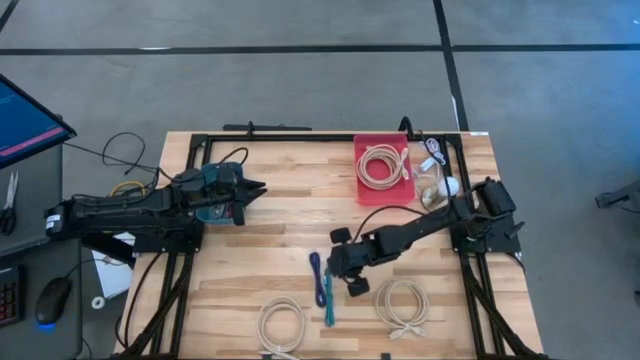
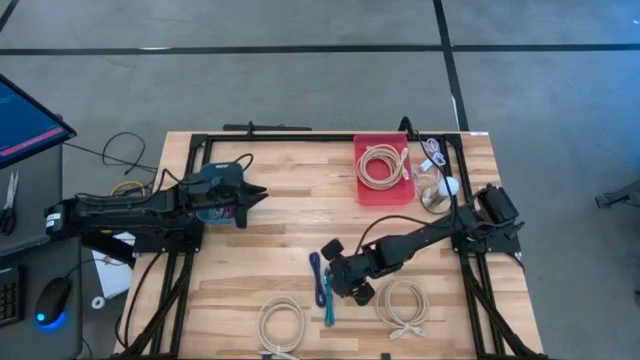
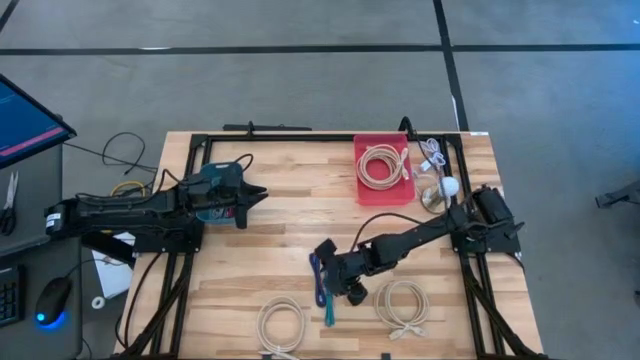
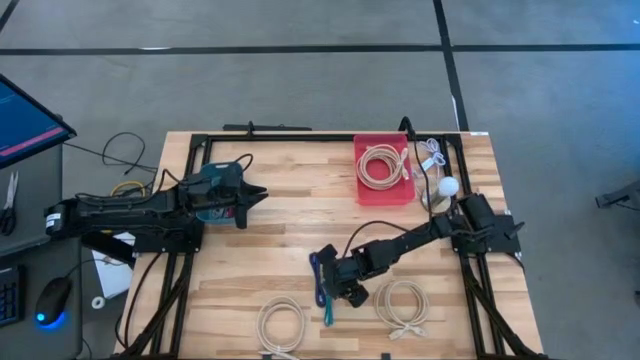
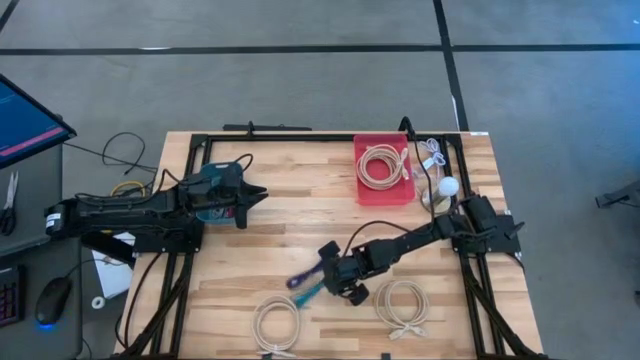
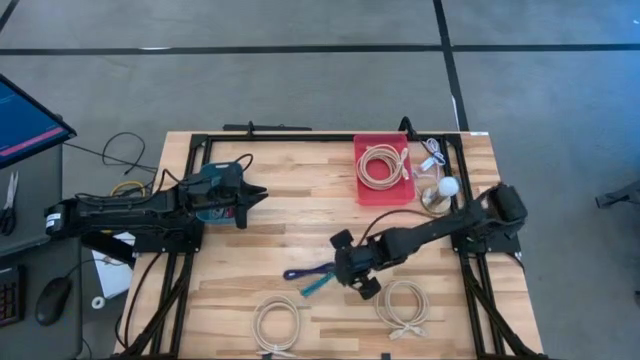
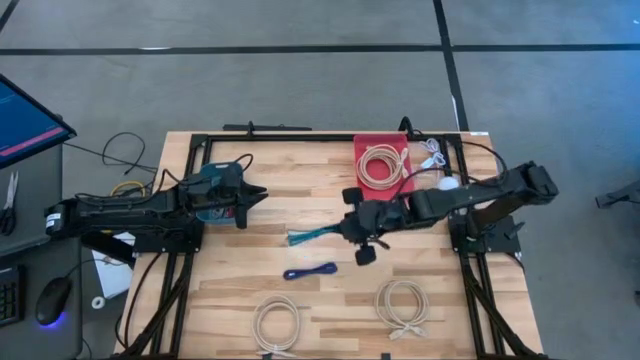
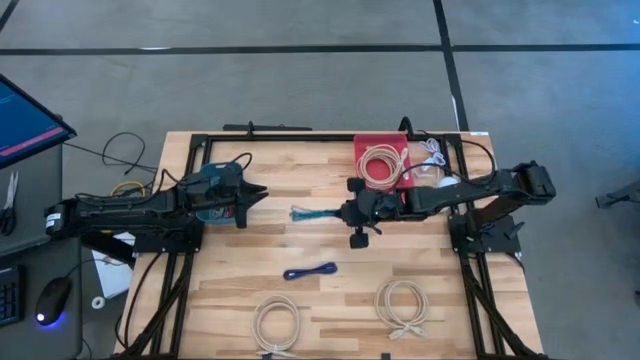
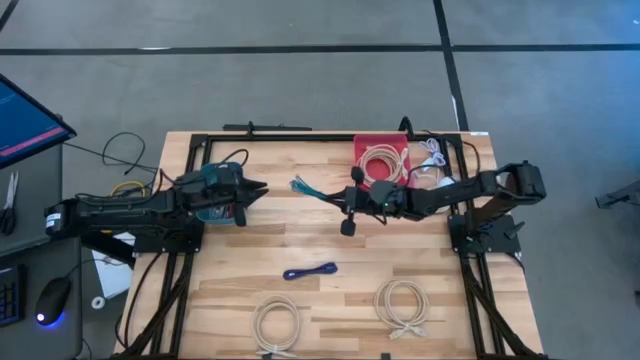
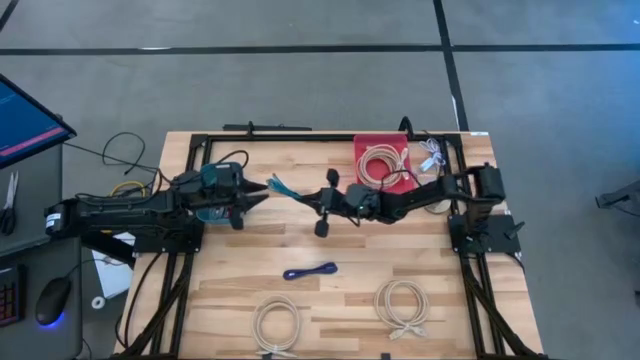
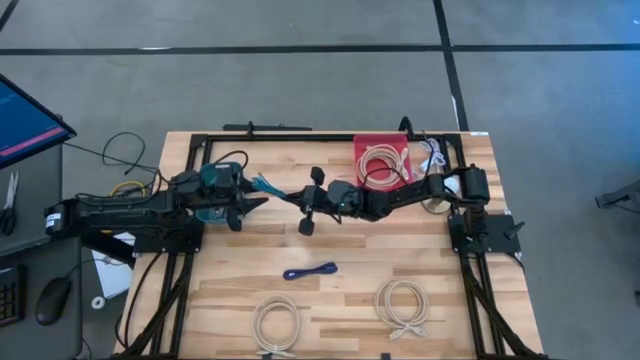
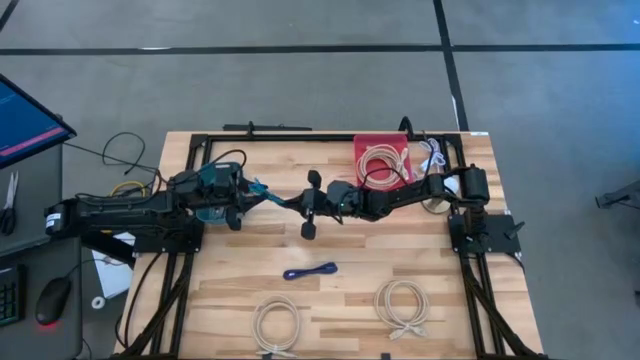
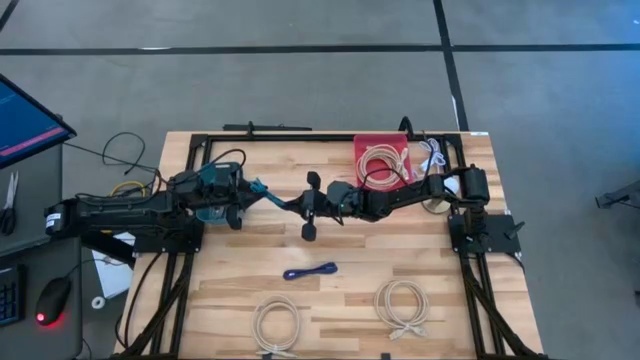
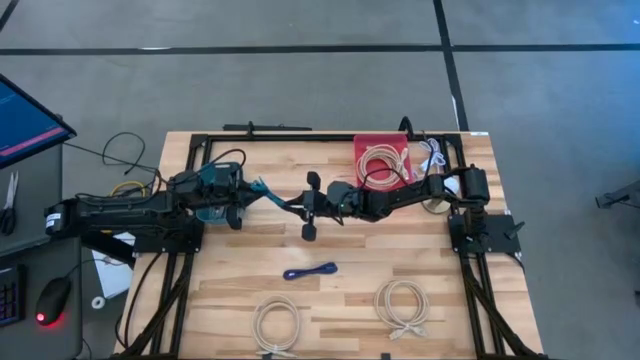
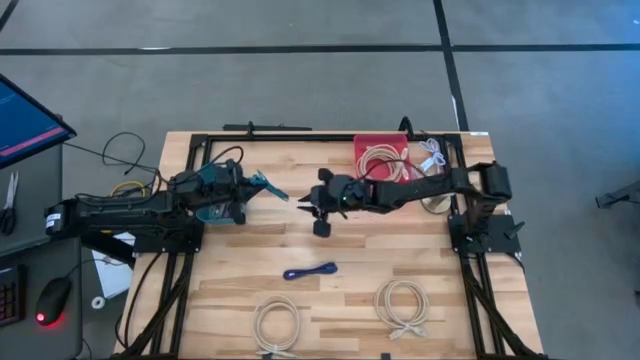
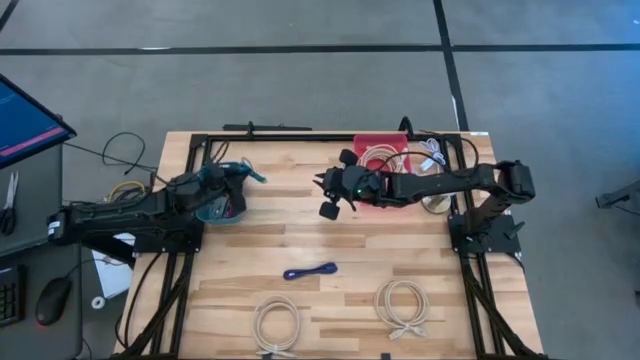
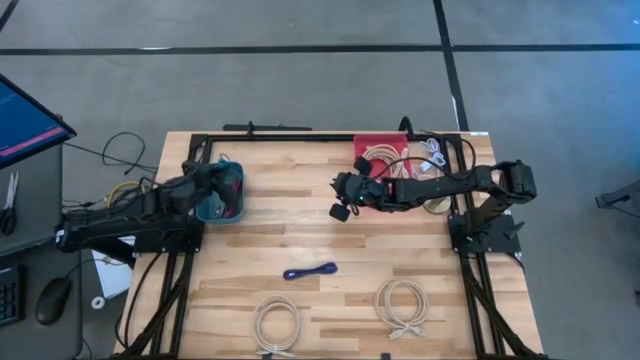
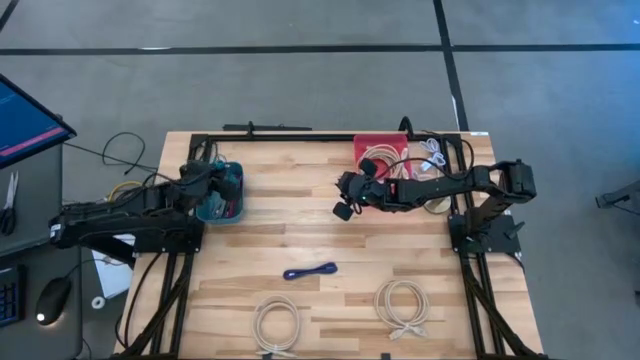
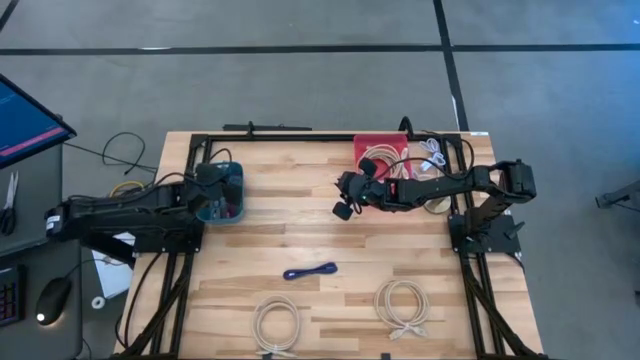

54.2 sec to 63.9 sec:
Task: Pick & Place USB Port
Put the blue charger cable in the blue bin

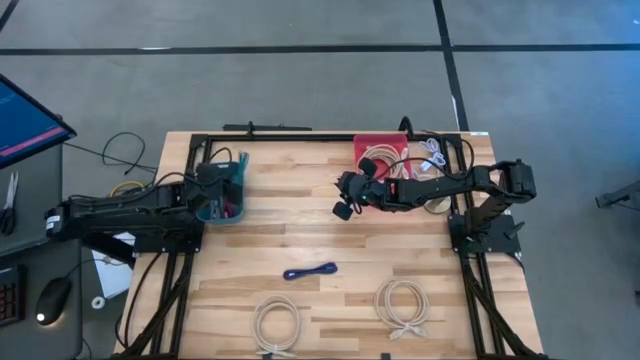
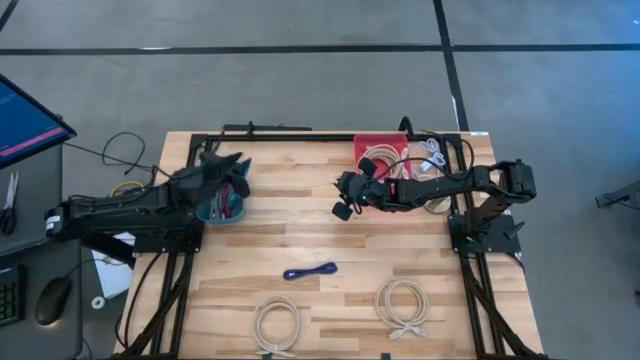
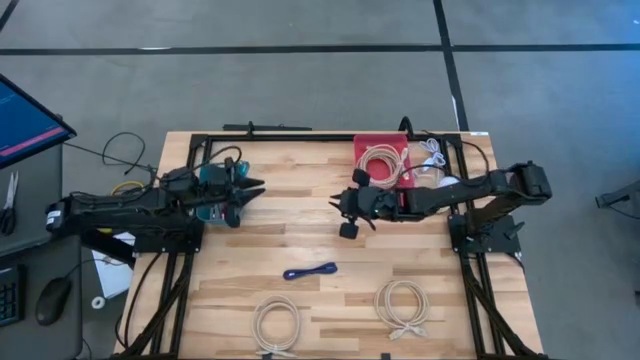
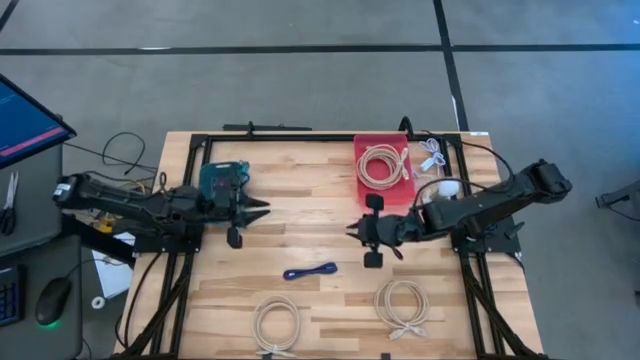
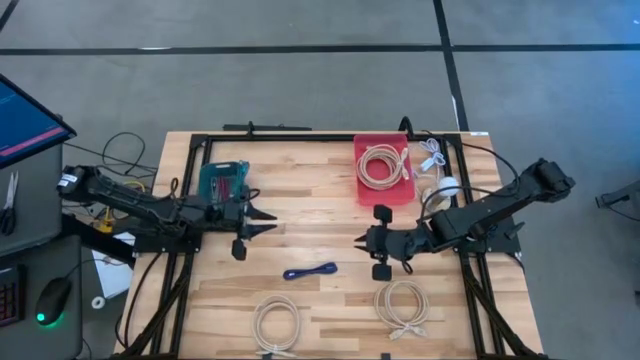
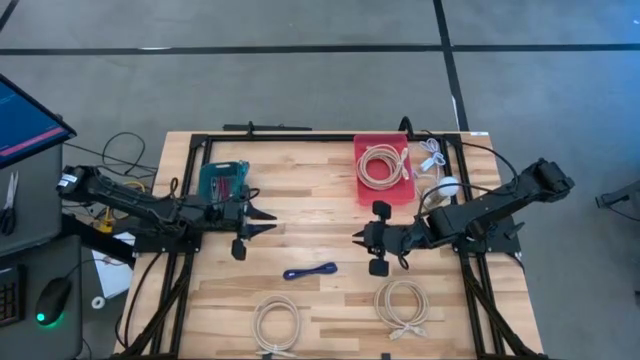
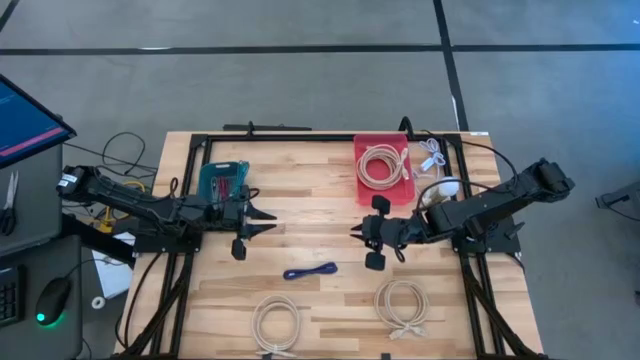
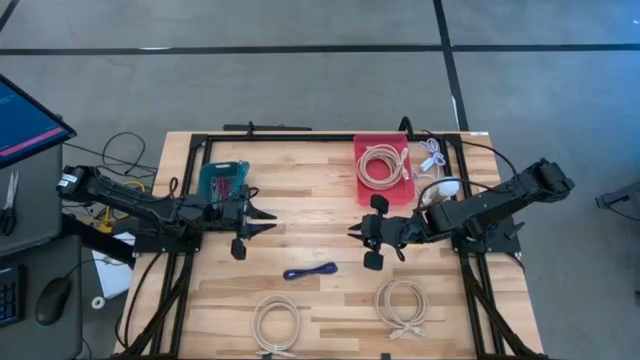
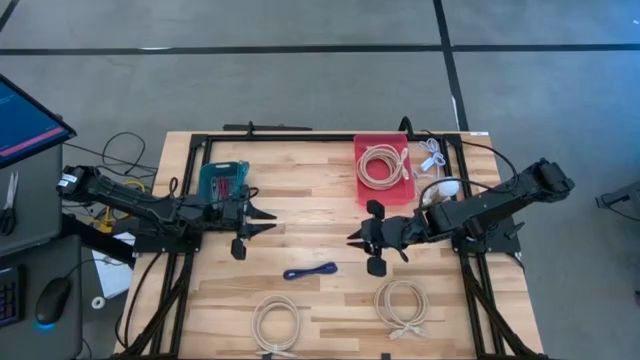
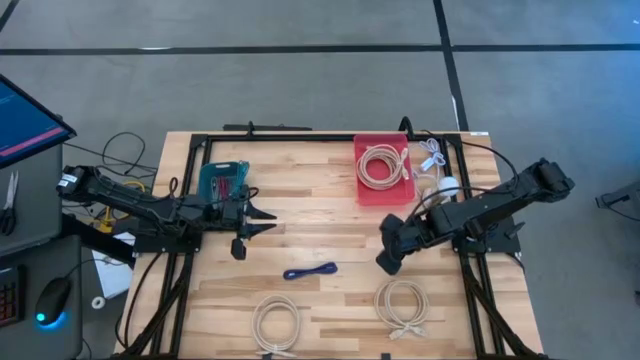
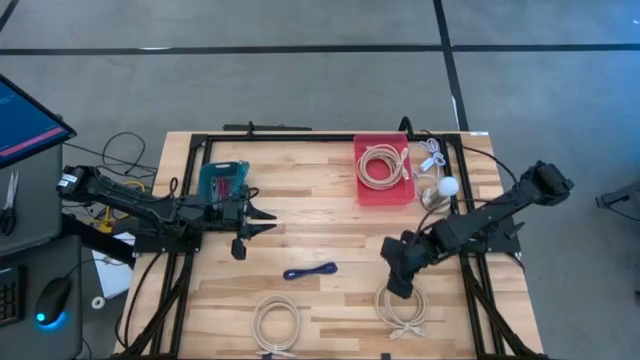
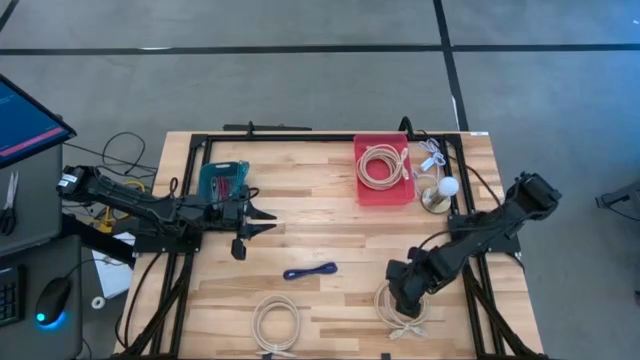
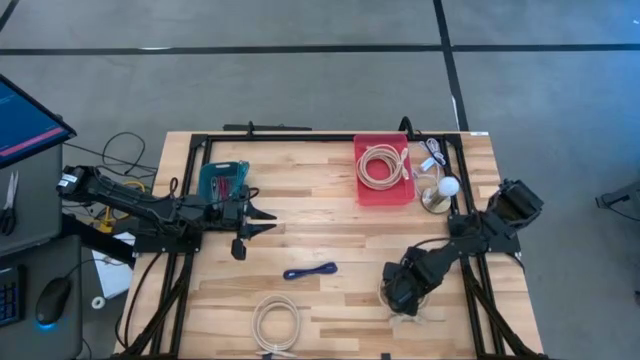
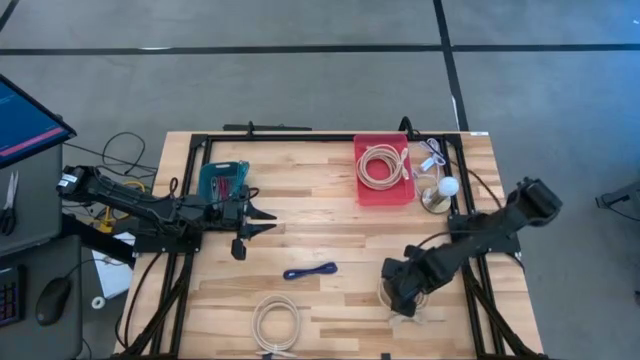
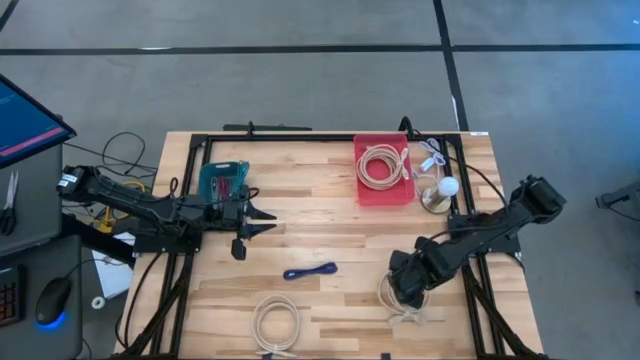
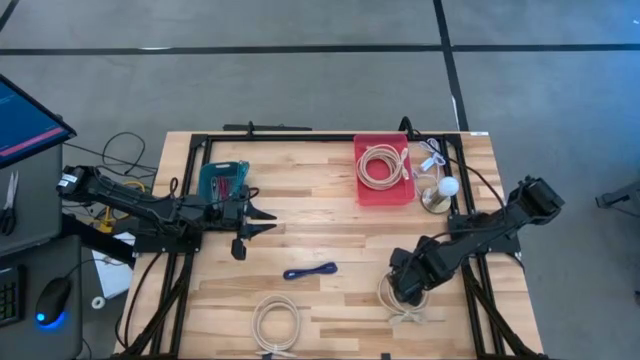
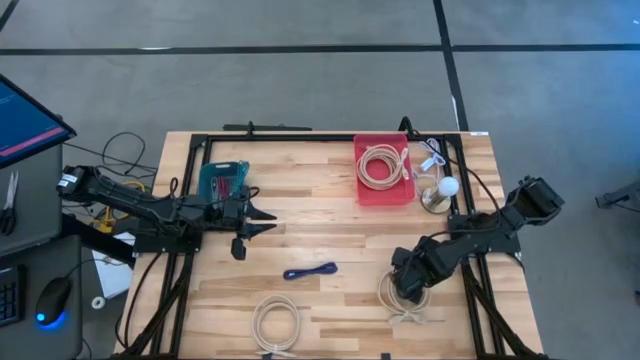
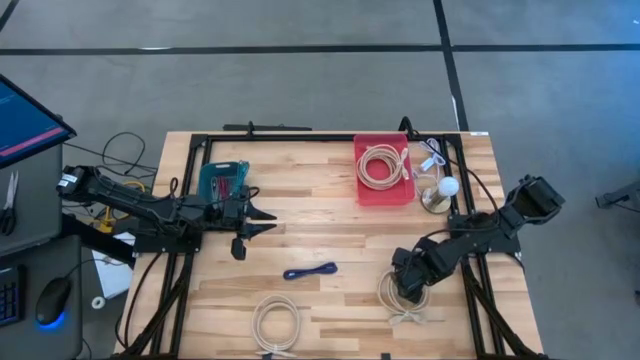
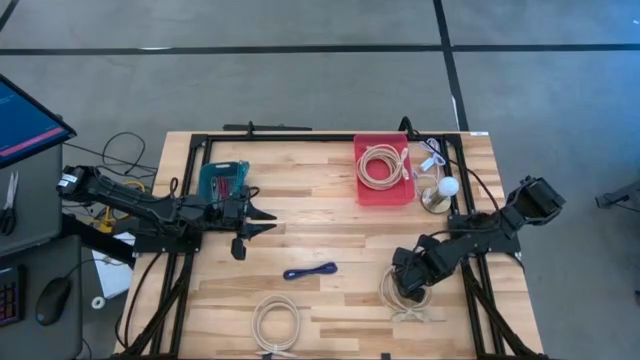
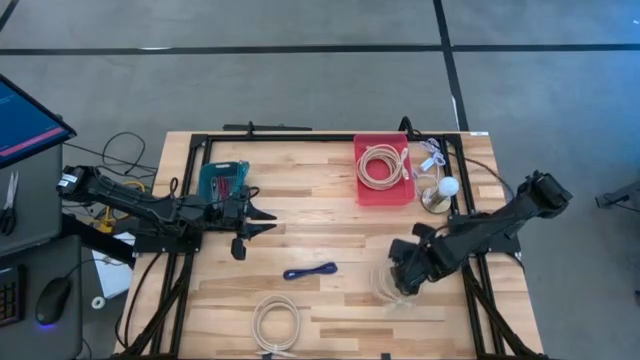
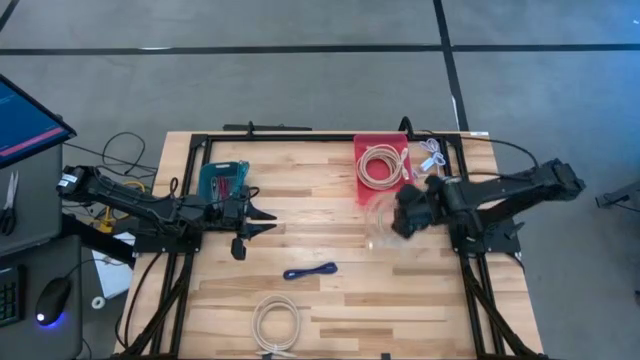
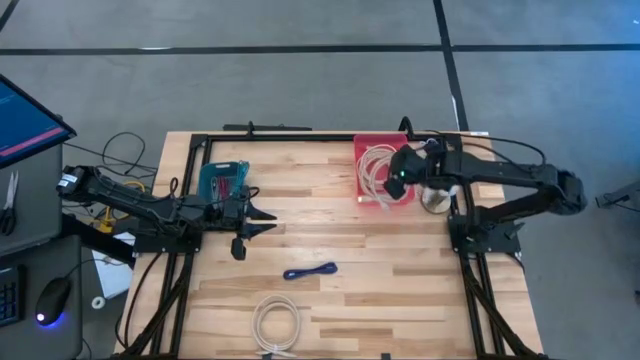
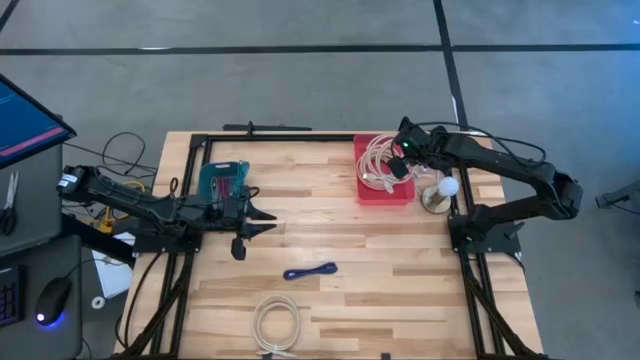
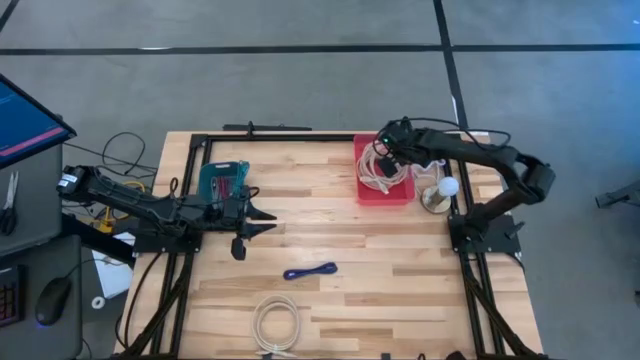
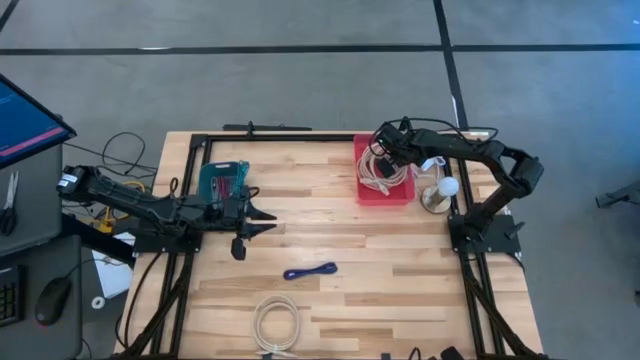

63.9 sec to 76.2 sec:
Put the brown display cable in the pink bin
